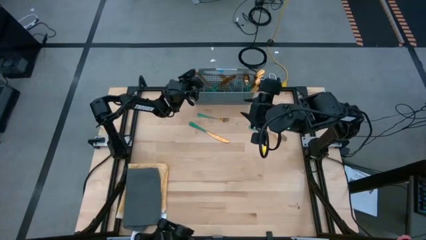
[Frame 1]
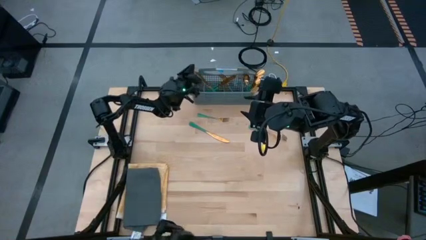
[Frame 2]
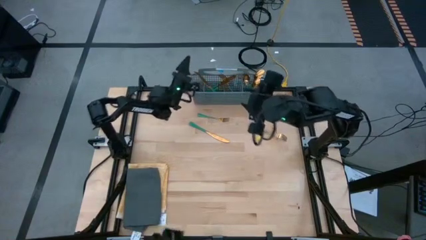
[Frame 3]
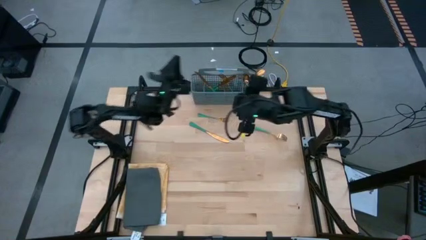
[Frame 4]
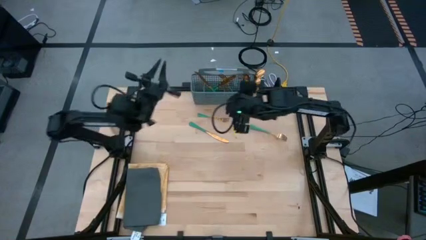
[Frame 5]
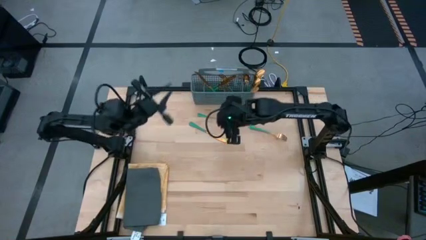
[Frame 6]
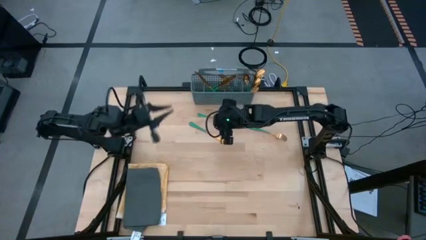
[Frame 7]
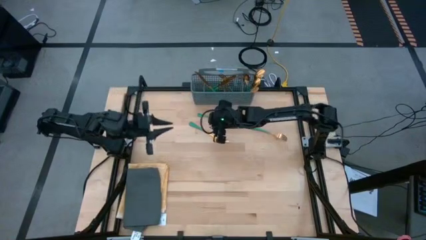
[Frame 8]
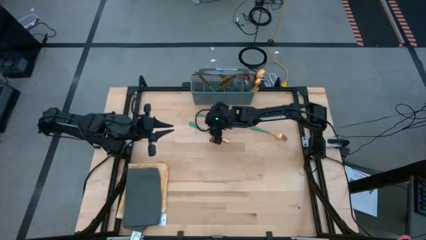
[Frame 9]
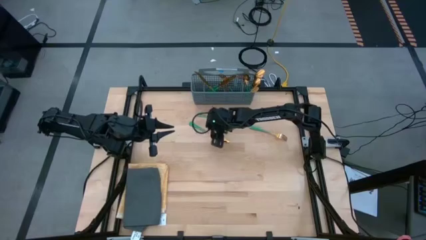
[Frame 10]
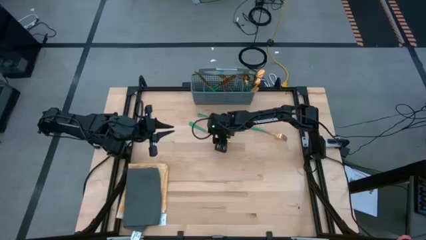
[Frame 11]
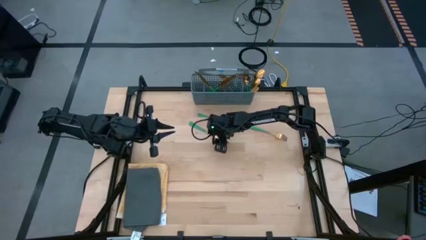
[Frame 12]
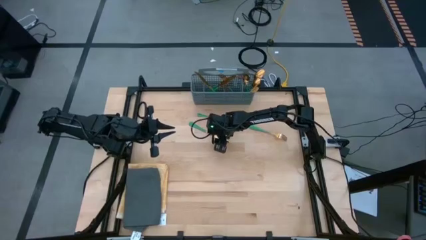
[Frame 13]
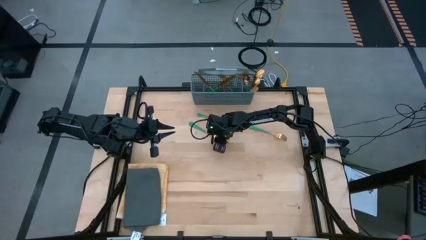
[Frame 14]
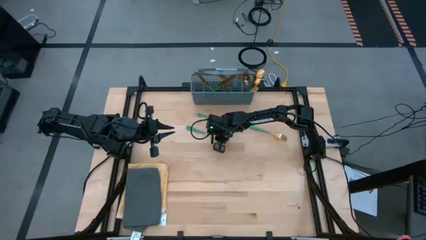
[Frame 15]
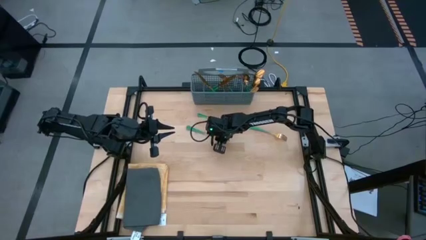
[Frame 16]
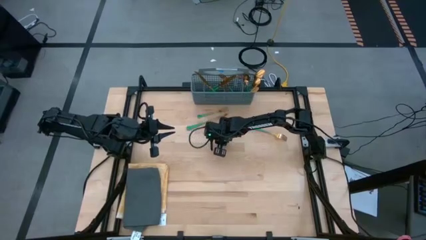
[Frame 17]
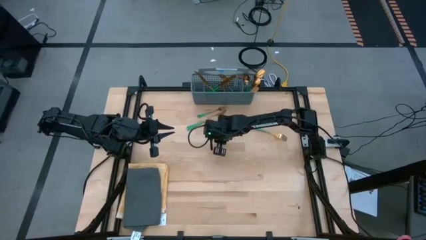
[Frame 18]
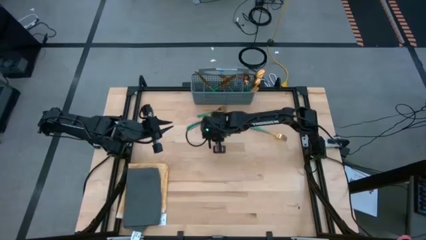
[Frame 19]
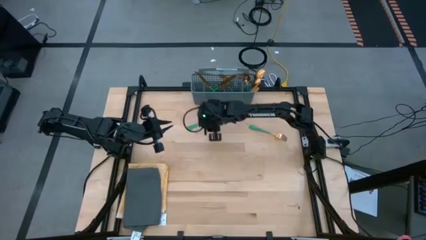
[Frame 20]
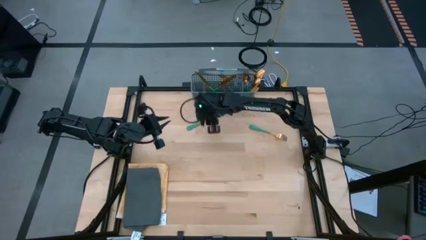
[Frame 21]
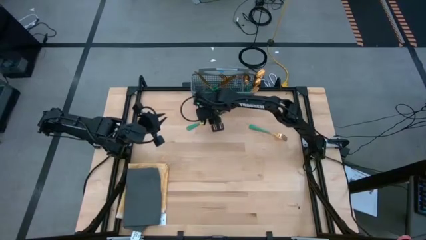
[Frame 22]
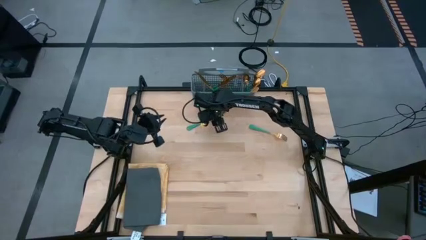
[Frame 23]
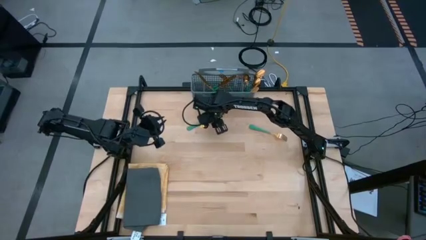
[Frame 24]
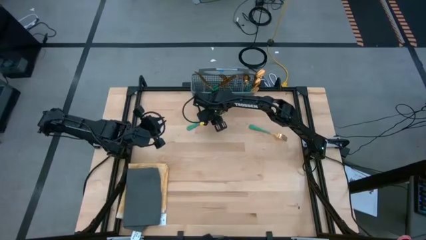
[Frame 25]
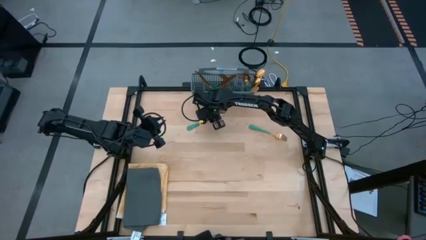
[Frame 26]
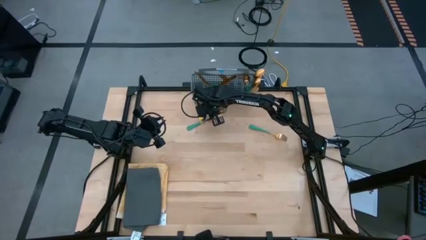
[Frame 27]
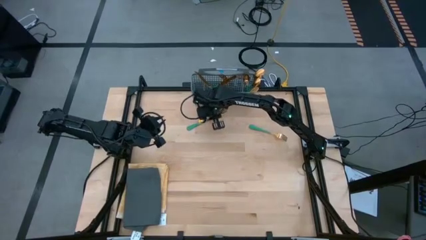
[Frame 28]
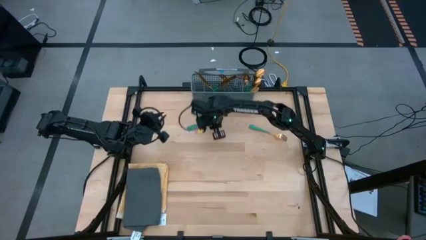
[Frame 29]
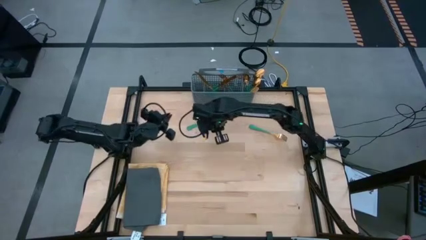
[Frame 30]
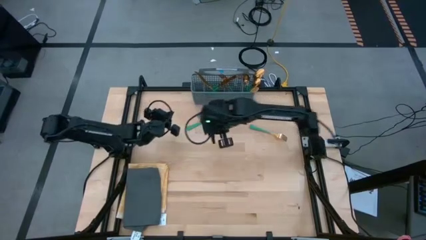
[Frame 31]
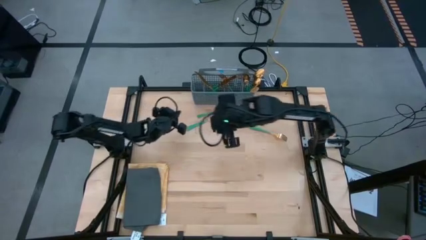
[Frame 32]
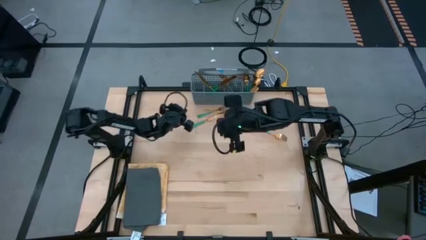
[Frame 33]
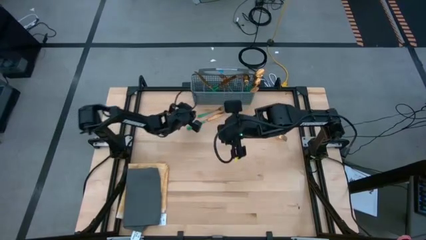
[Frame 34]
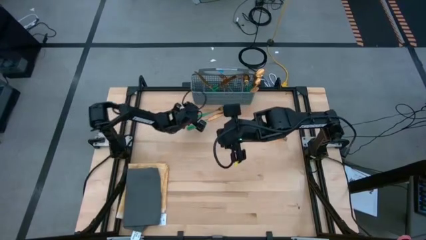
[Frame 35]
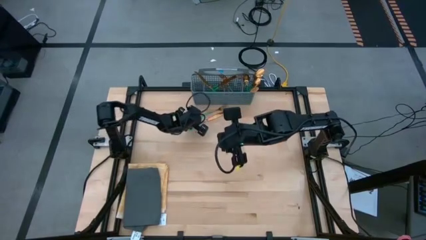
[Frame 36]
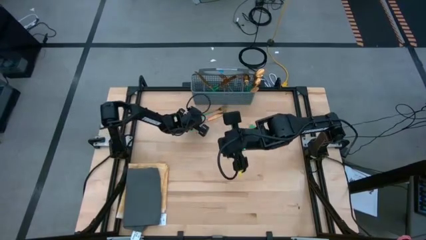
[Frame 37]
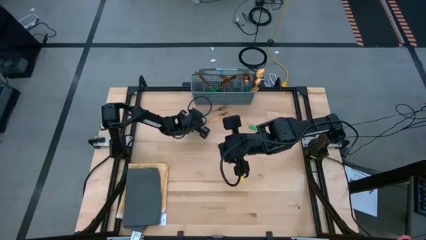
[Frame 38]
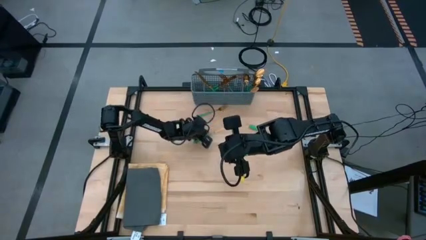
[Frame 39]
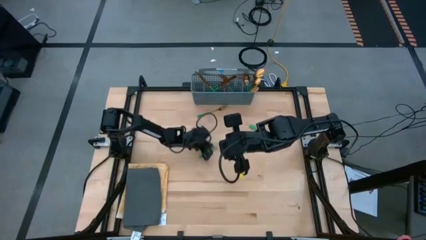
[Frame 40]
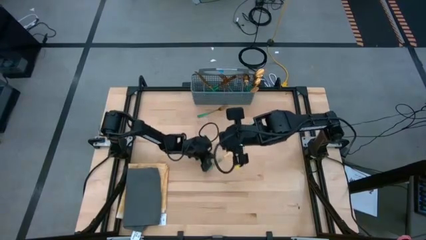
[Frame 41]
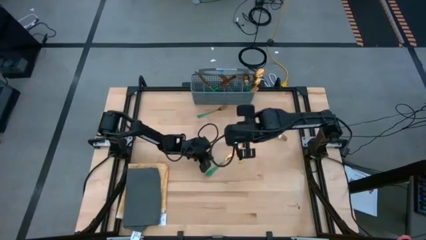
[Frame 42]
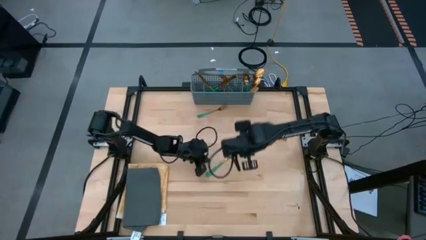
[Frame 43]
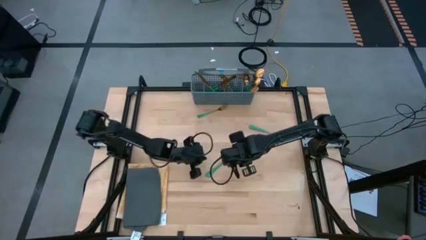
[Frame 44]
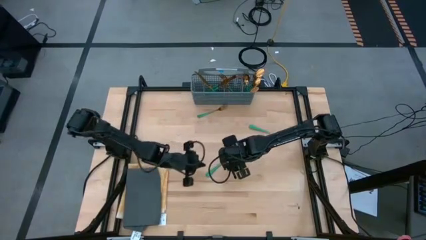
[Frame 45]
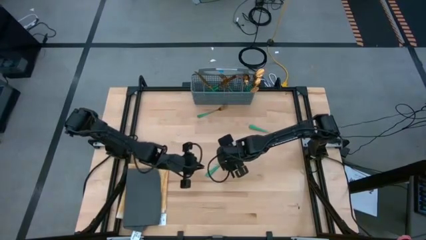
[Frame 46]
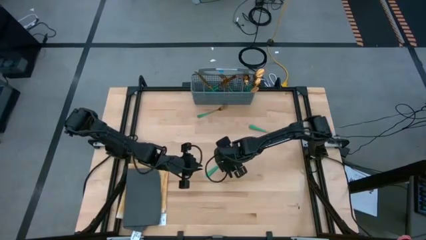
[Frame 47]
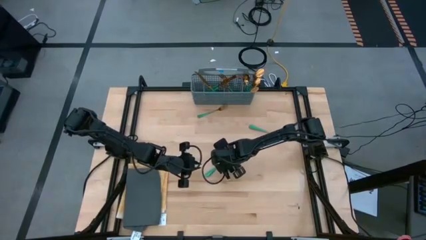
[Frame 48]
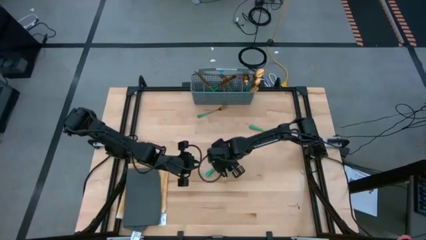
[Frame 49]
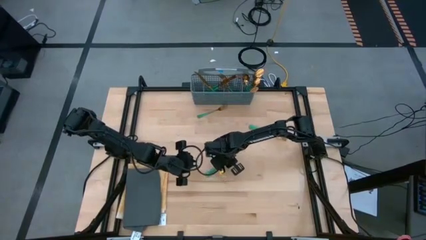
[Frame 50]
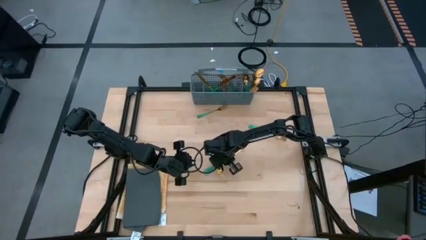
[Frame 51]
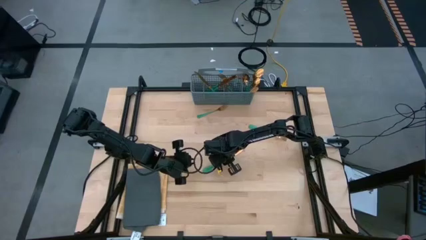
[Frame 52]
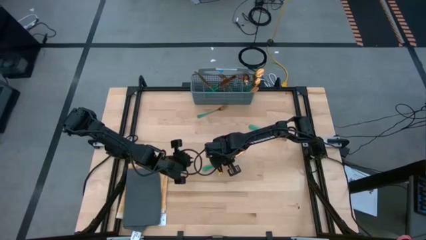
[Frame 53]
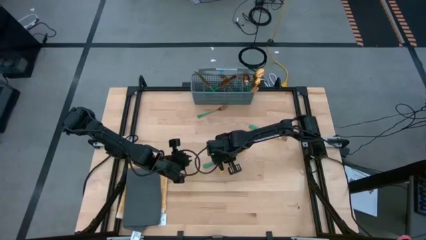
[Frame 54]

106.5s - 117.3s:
Task: Sort silverware
Put the green knife into the dishwasher utensil holder

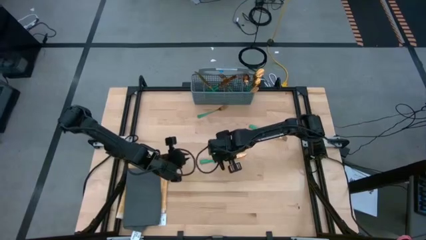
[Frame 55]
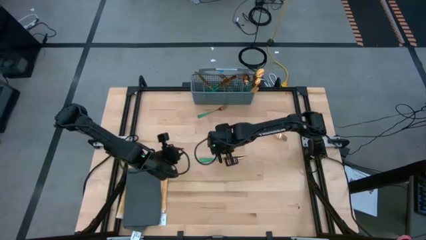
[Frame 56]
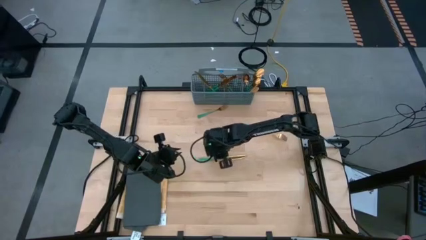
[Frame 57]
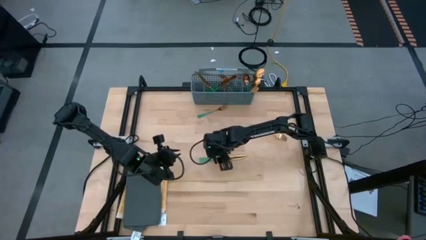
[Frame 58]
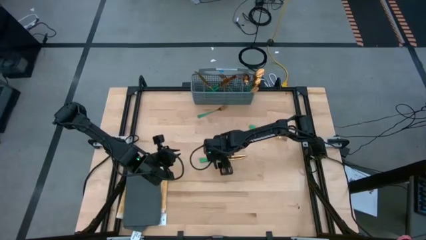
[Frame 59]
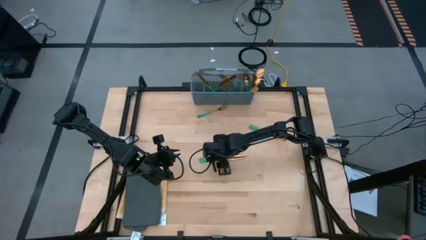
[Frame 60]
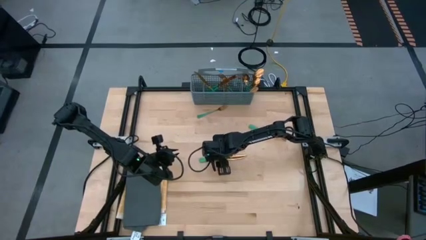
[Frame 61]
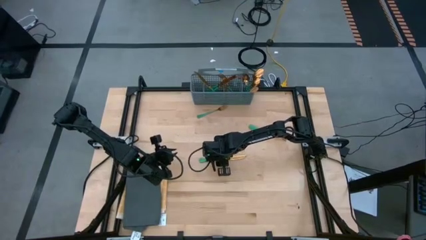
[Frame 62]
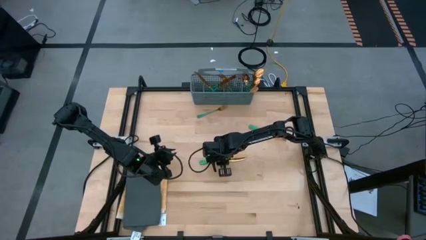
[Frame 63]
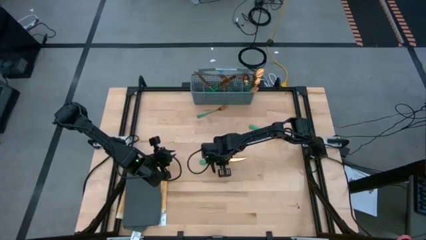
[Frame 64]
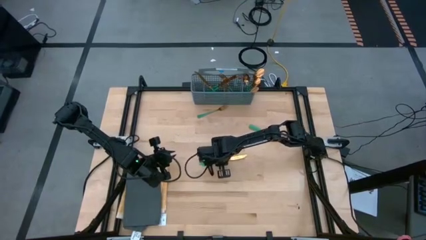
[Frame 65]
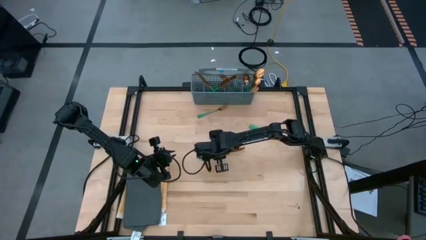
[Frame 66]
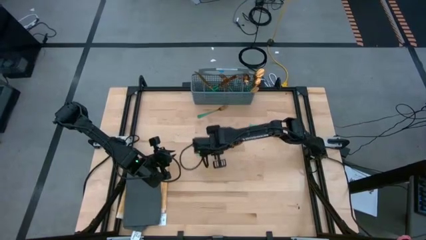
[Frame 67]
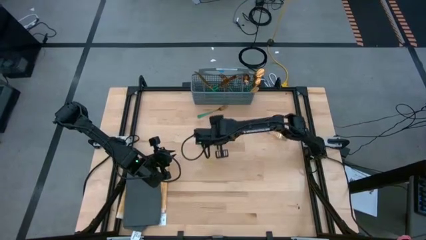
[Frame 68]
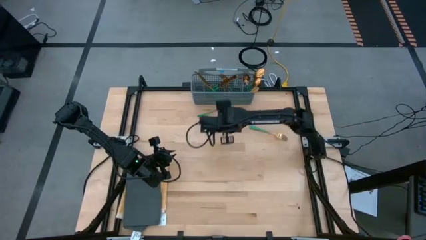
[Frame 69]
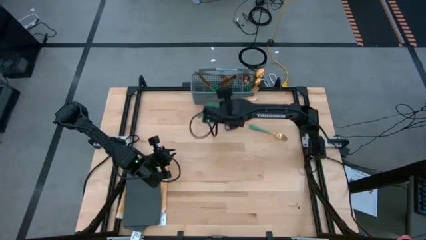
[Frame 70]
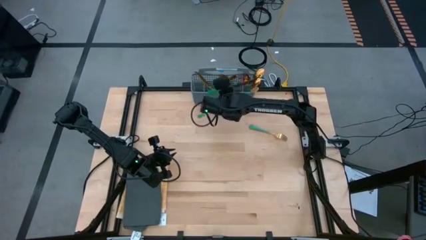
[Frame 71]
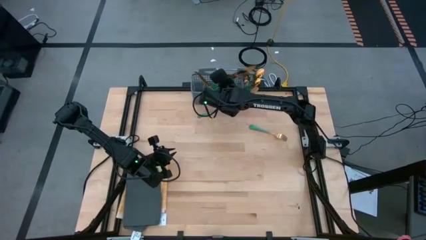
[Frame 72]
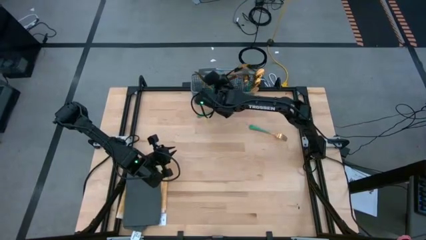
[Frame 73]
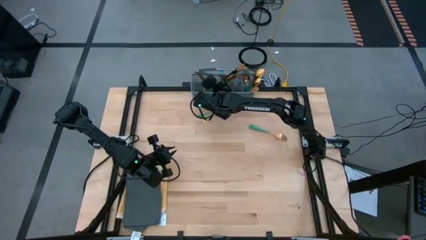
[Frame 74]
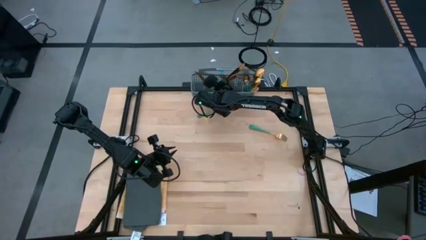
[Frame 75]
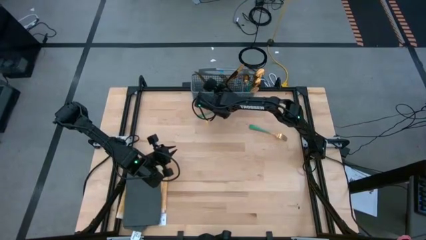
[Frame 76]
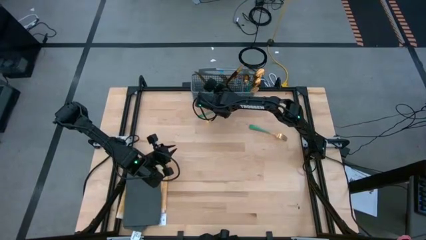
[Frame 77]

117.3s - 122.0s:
Put the green knife into the dishwasher utensil holder
